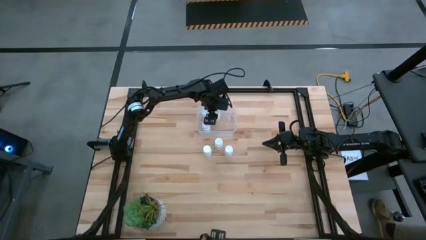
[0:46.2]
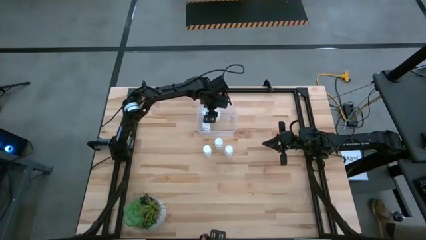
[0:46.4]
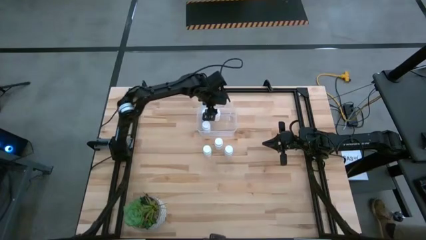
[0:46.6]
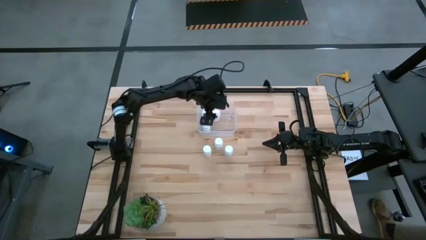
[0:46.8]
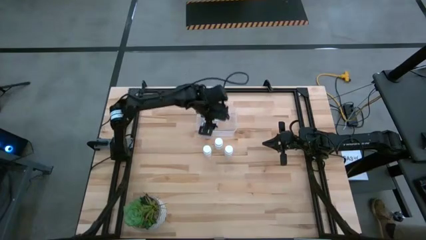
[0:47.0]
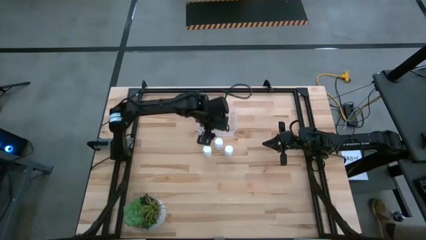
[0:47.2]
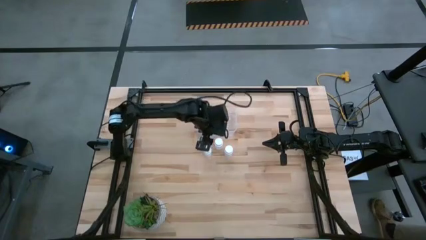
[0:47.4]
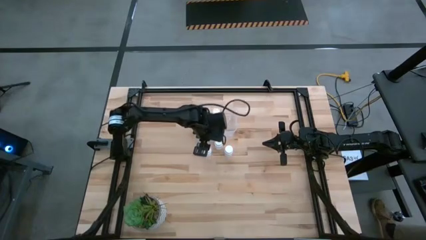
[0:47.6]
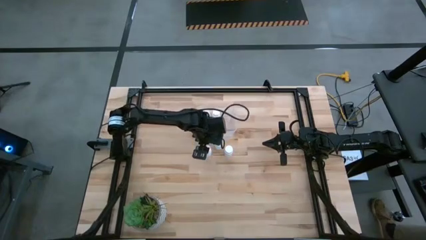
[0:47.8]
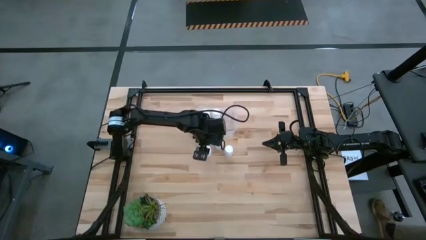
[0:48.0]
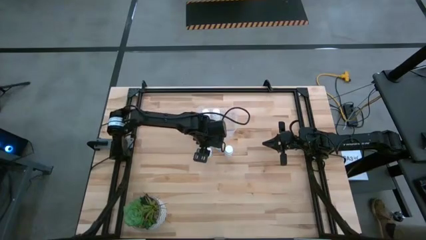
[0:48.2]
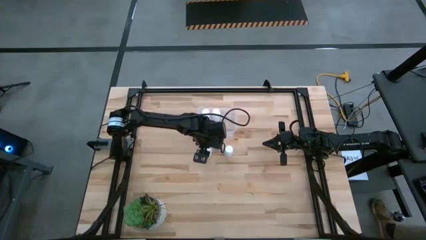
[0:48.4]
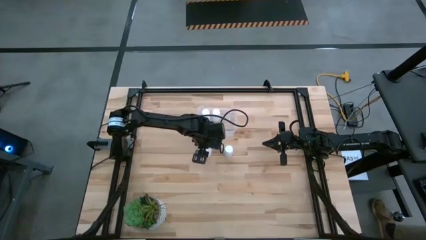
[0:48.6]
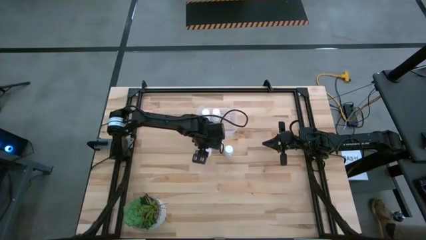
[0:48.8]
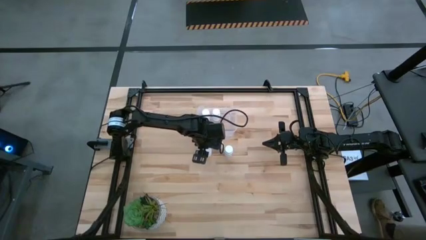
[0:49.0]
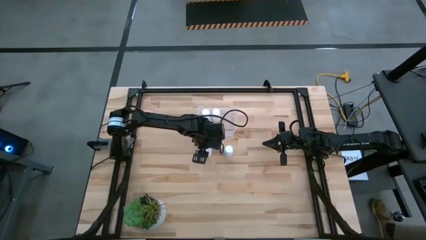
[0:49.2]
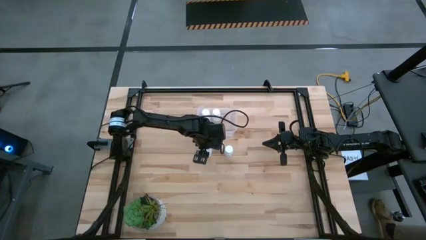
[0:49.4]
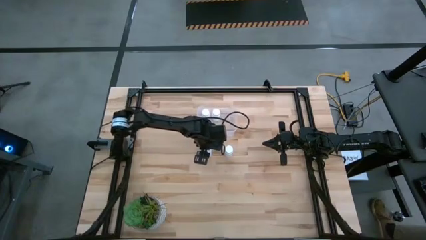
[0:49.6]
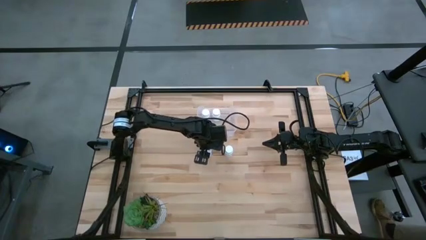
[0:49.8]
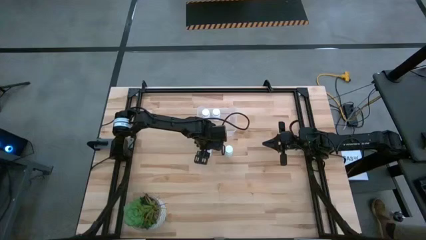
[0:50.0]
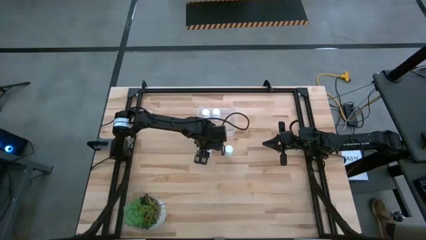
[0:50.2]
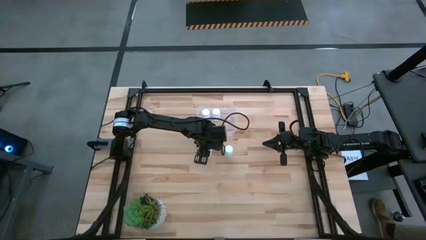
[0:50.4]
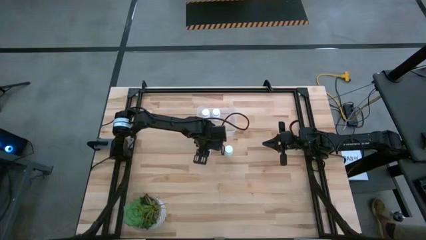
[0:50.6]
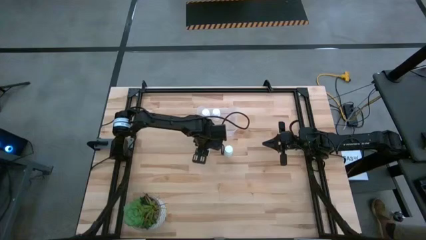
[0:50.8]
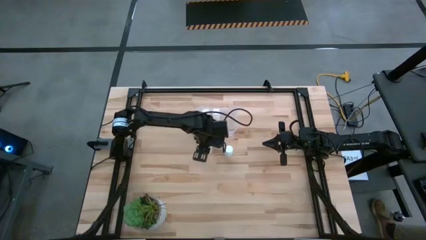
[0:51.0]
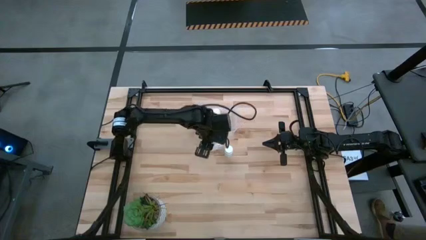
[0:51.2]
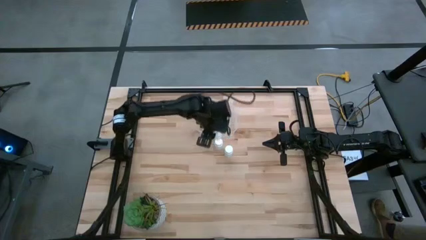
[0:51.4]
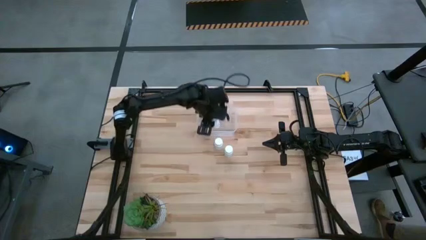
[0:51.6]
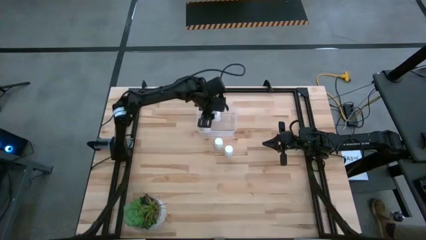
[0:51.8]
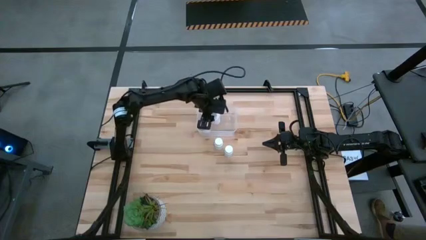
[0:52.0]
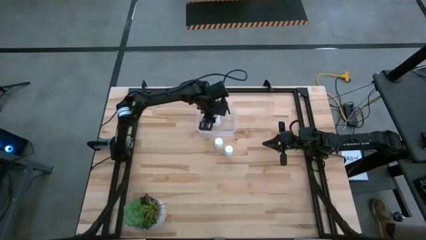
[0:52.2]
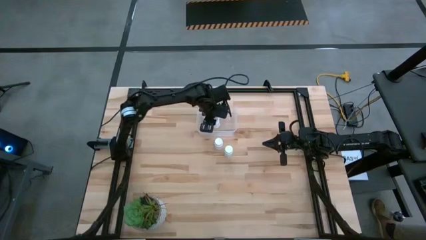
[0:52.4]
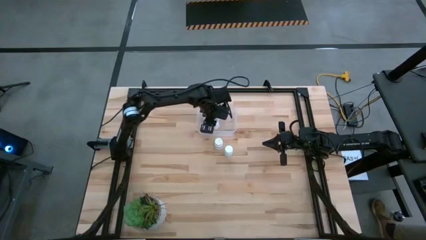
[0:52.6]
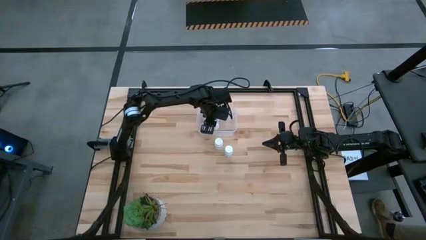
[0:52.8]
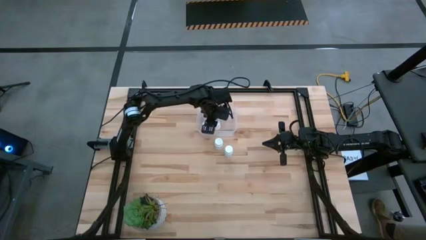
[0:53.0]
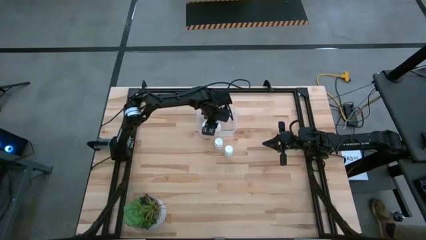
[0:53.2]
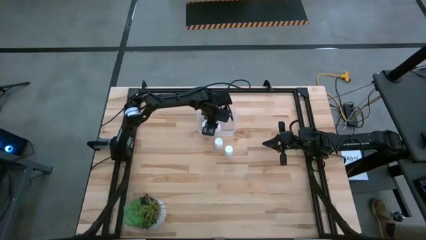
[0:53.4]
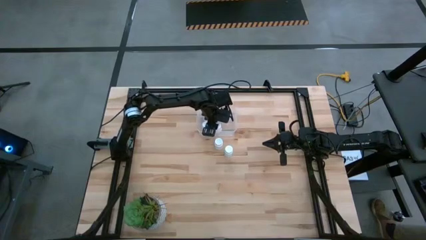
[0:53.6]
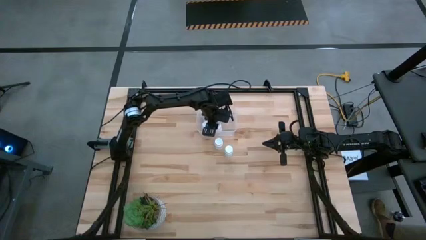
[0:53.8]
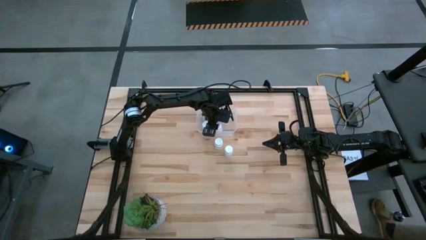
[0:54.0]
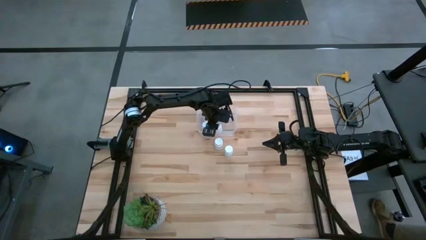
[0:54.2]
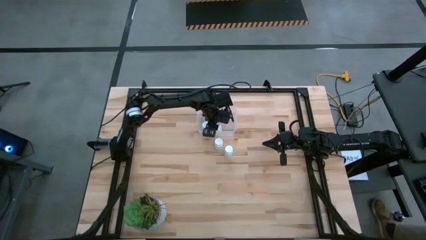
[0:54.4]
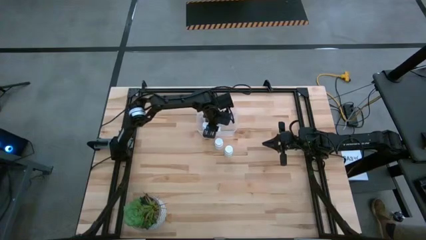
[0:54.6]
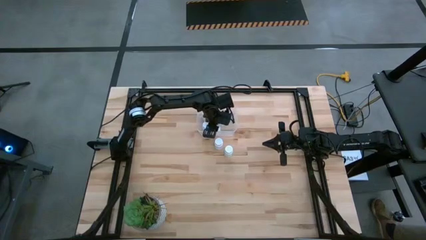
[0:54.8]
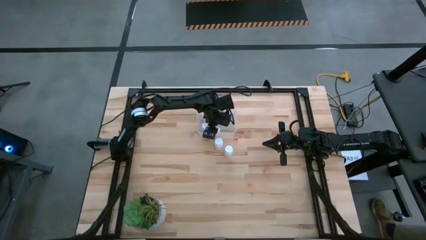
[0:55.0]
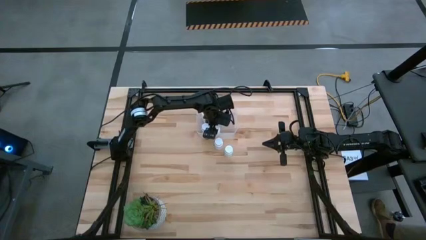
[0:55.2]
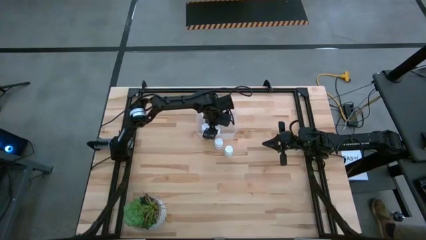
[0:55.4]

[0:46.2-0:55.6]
Task: Pick and place pill bottles into a basket
Put the left white pill bottle into the transparent bin
